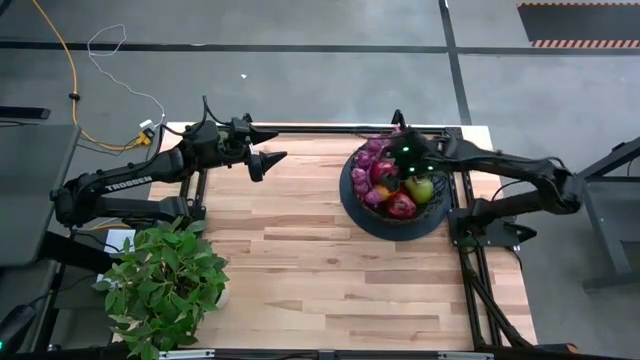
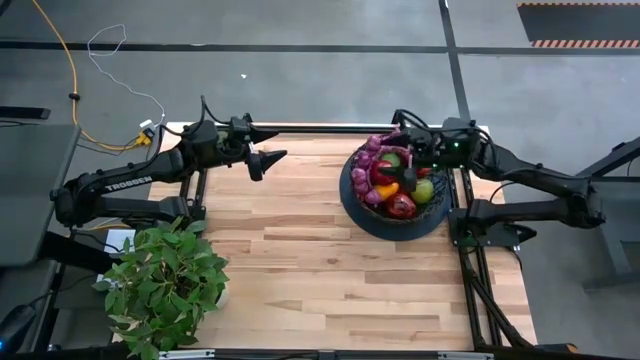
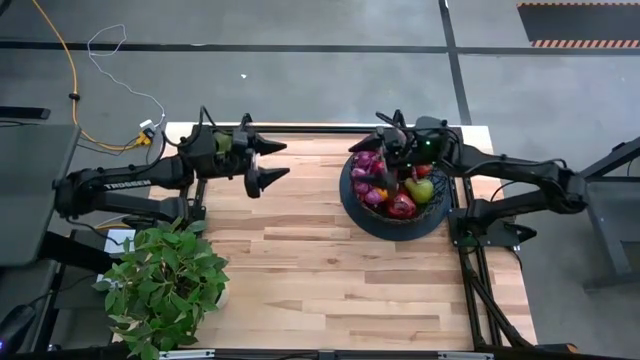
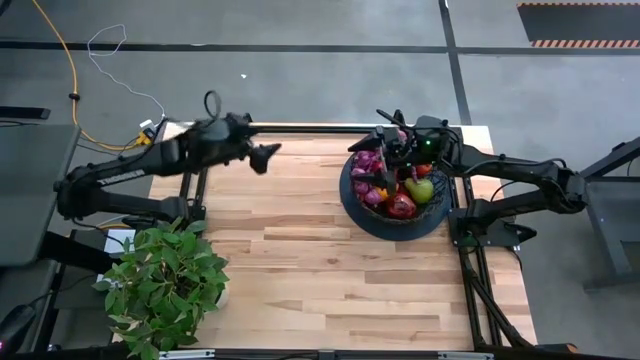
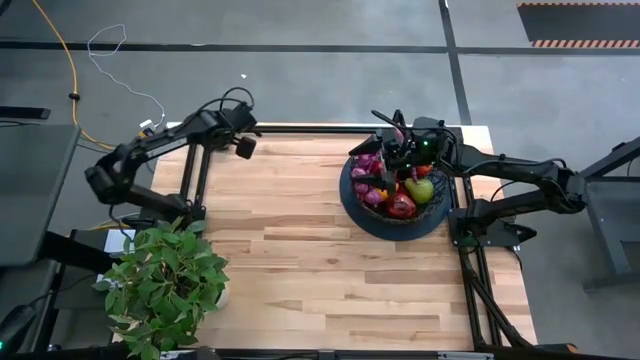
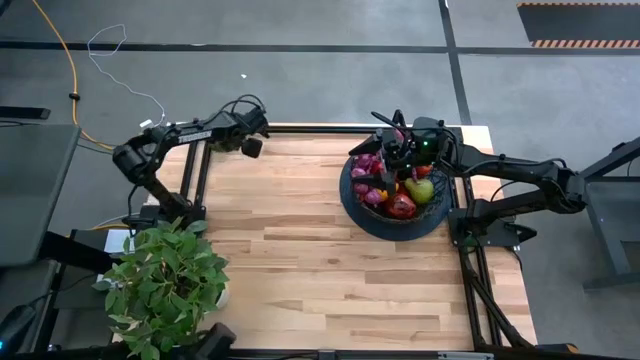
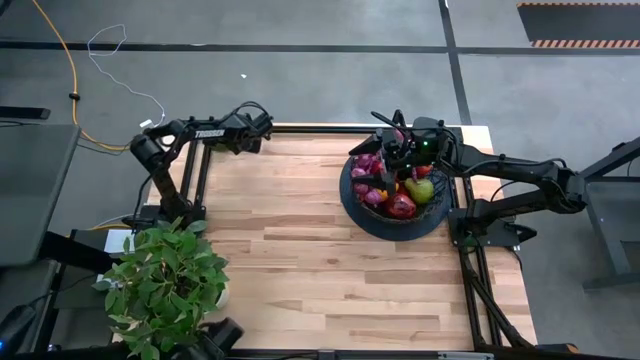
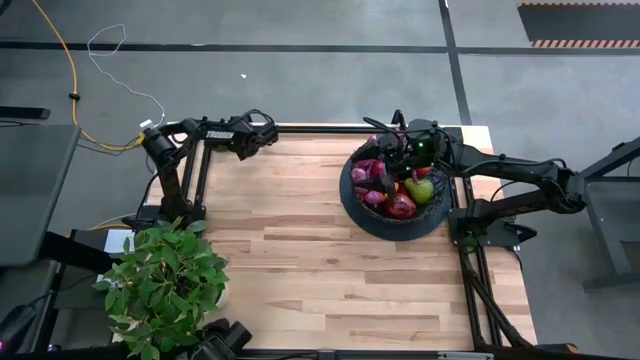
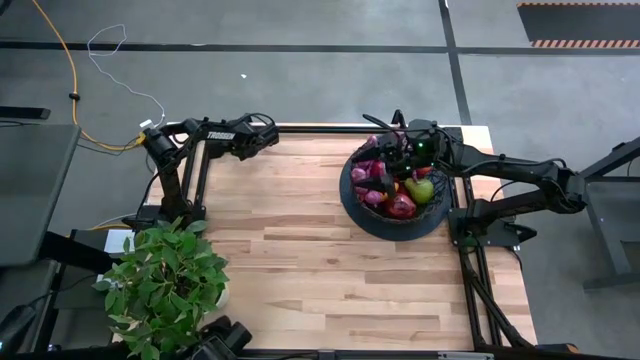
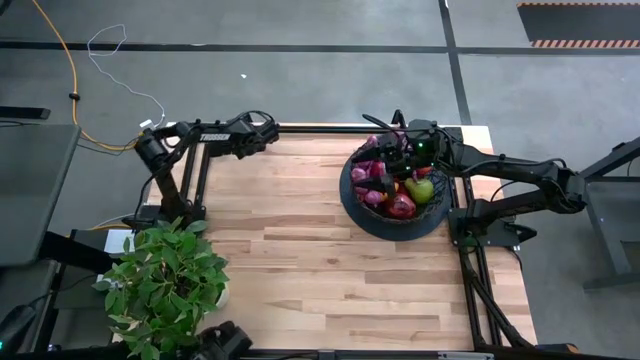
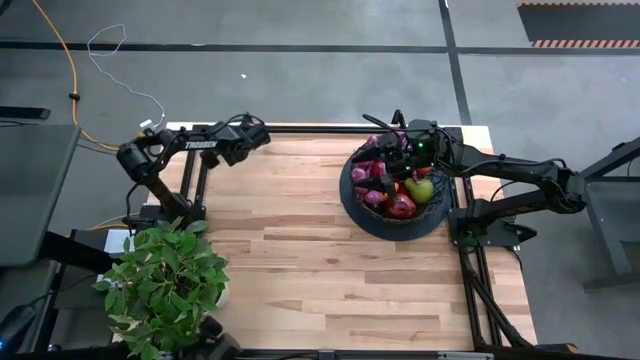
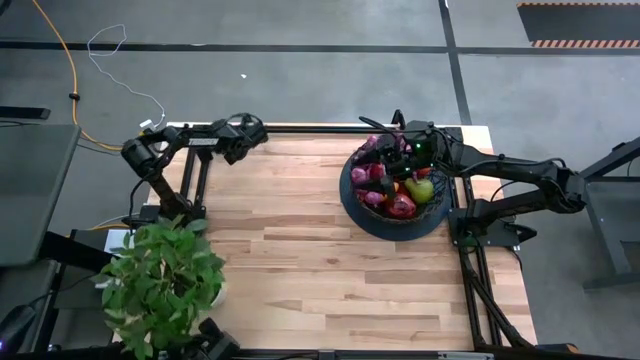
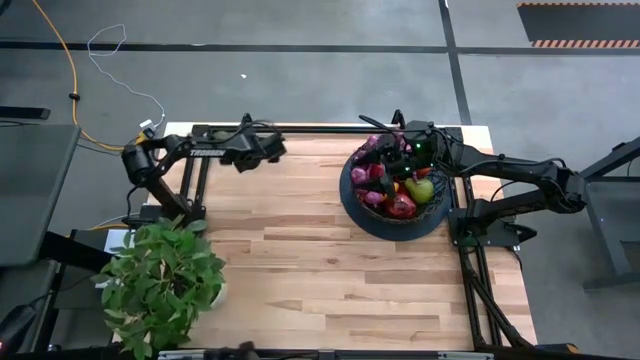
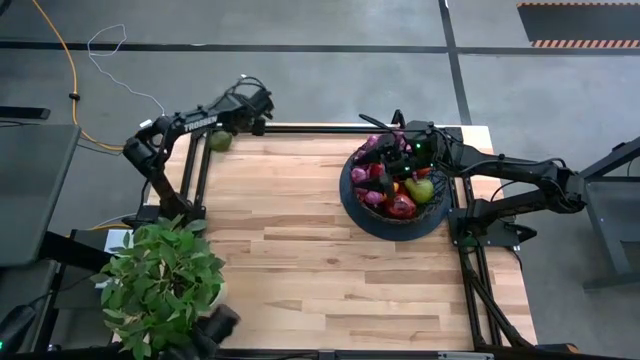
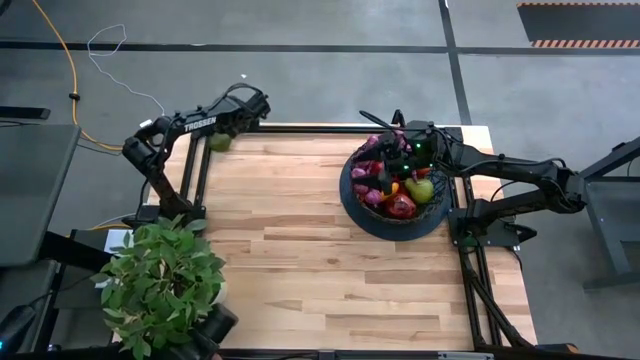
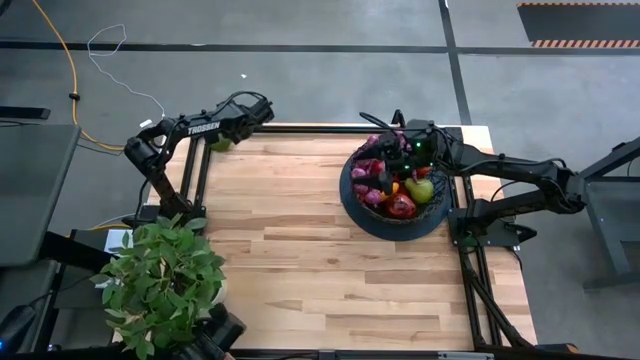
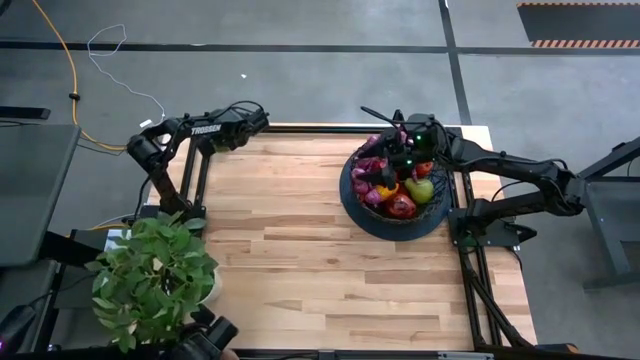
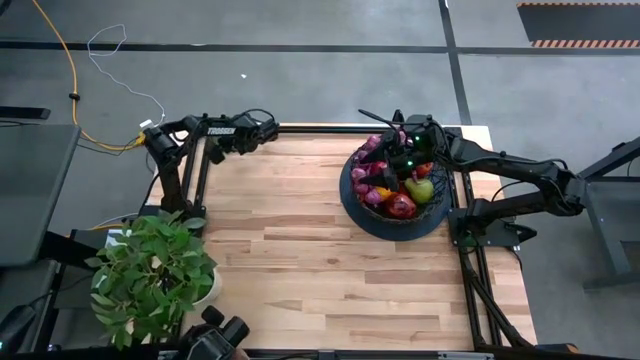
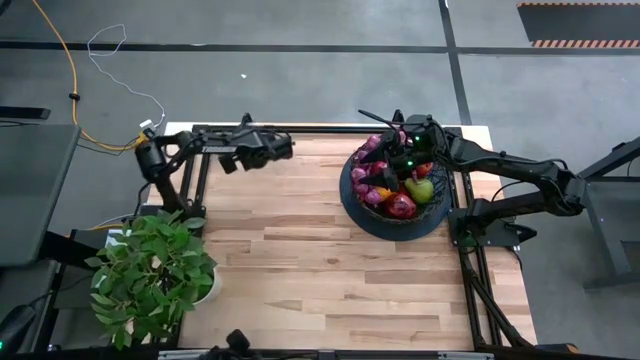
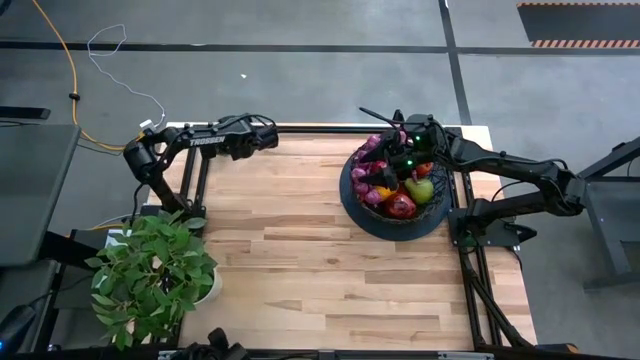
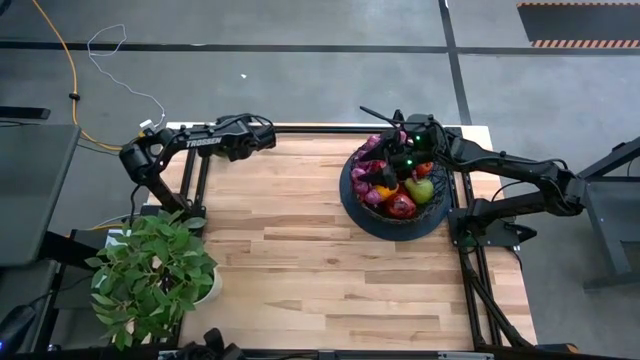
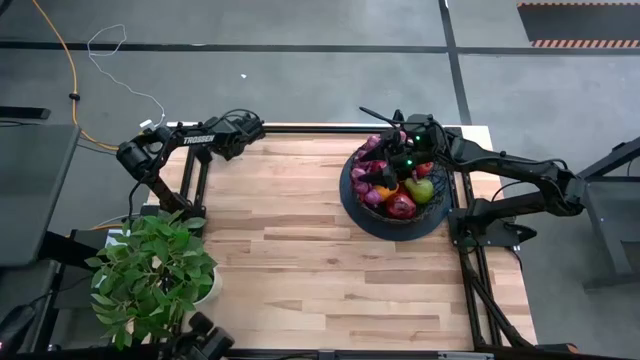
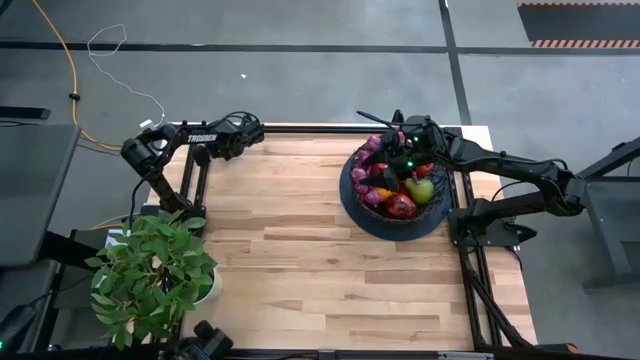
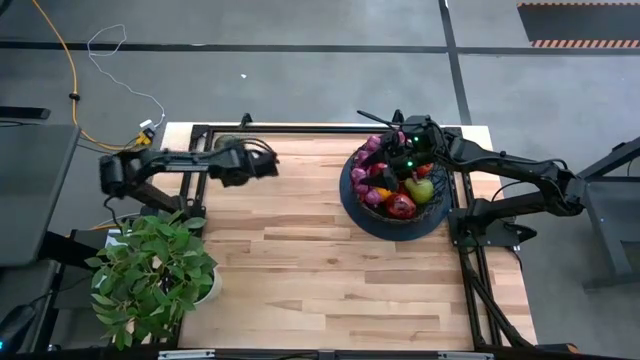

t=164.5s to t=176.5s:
Task: Build produce basket
Put the green lime into the black wire basket

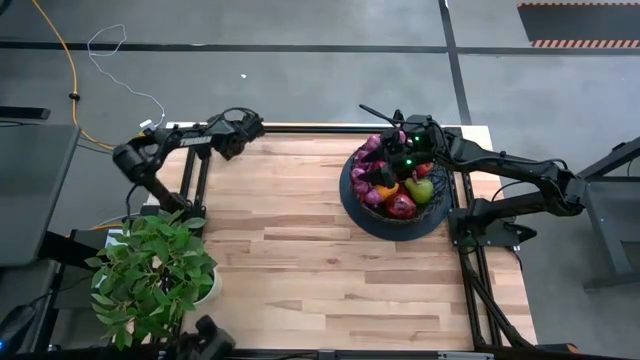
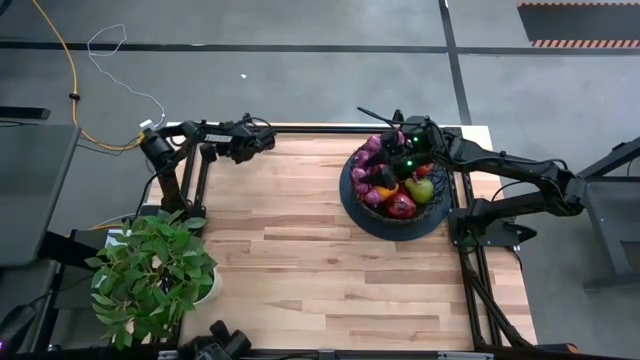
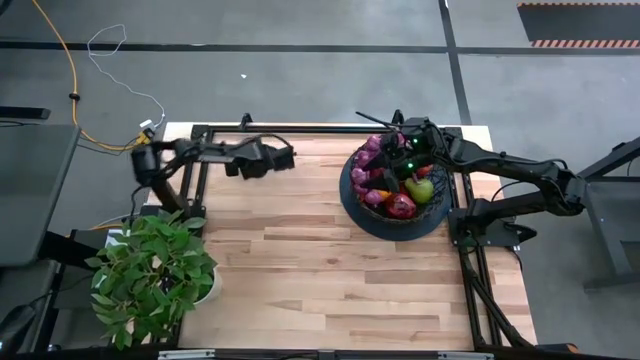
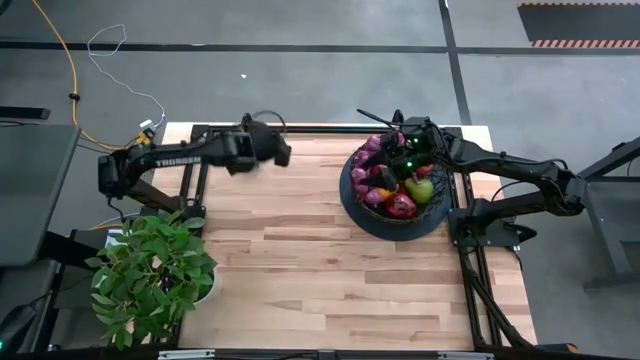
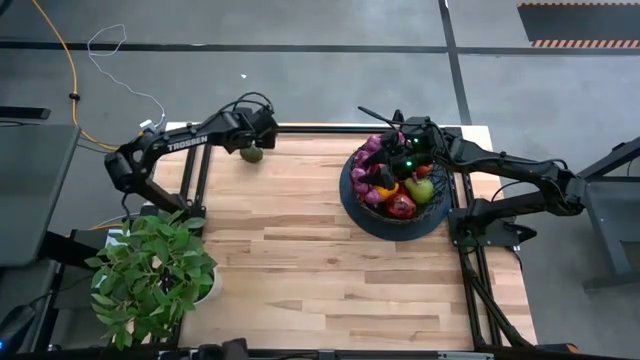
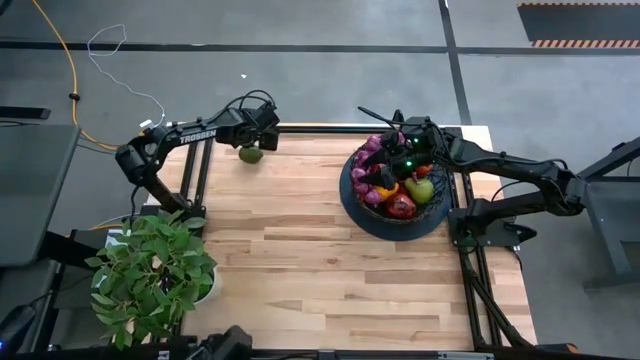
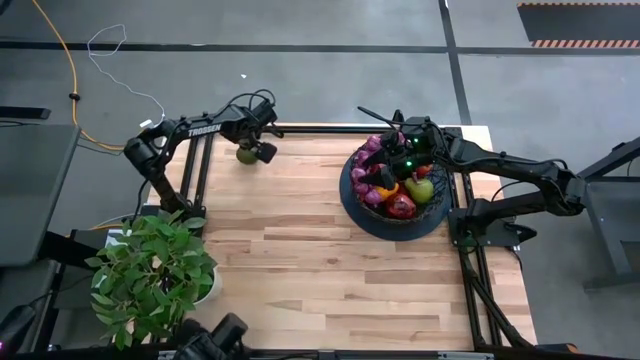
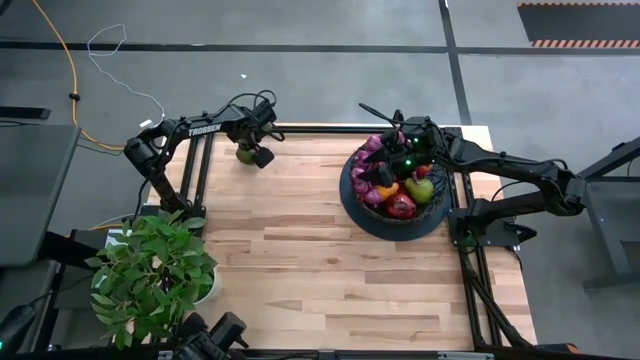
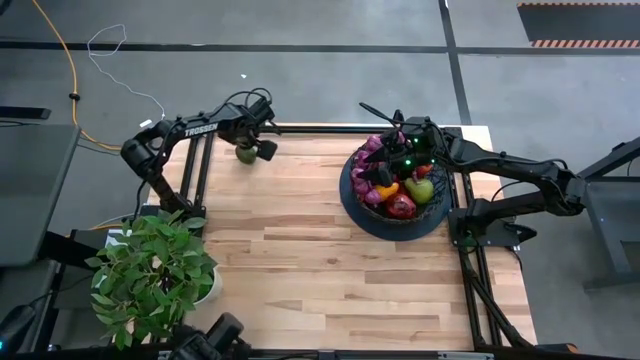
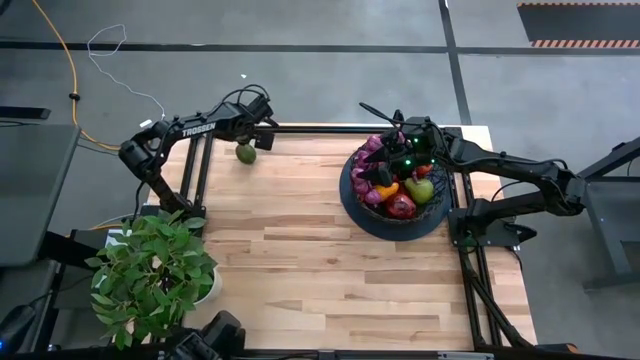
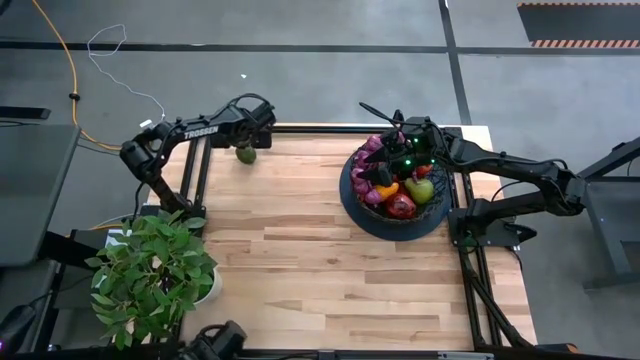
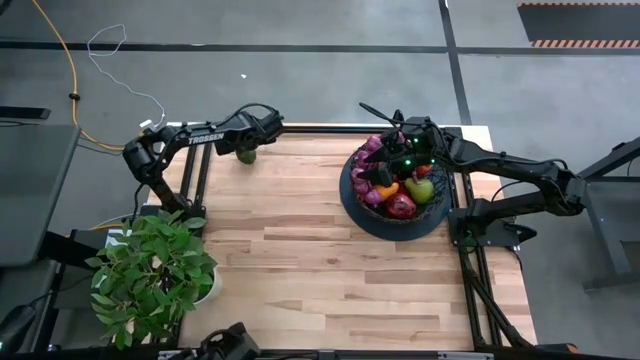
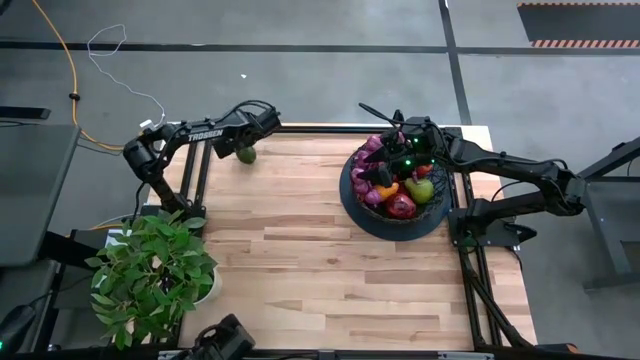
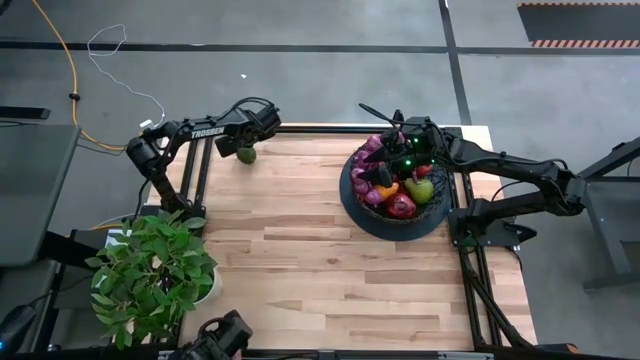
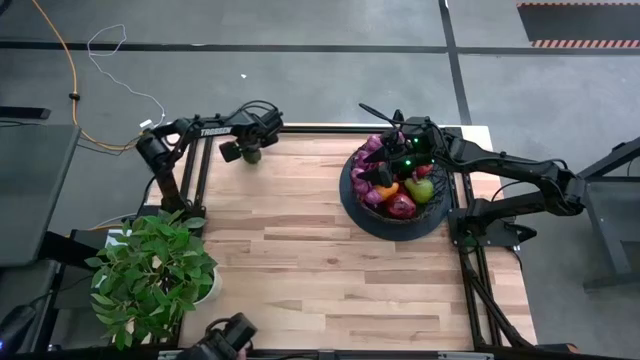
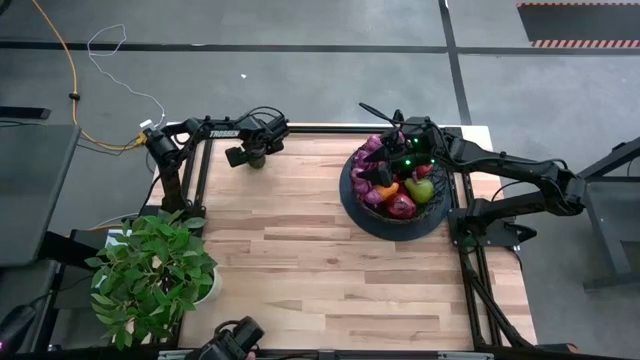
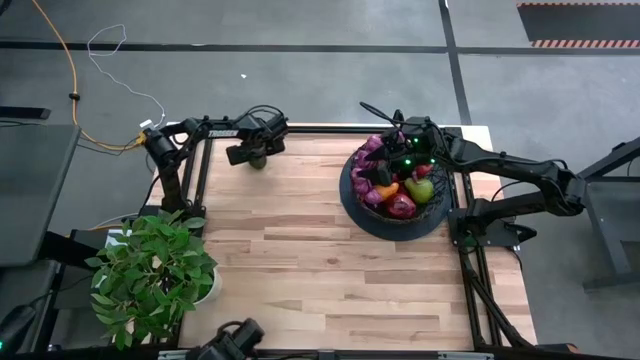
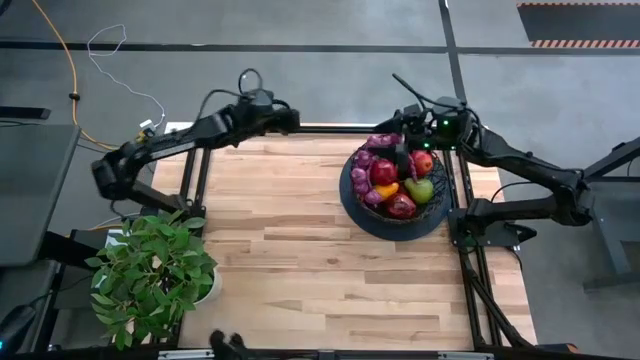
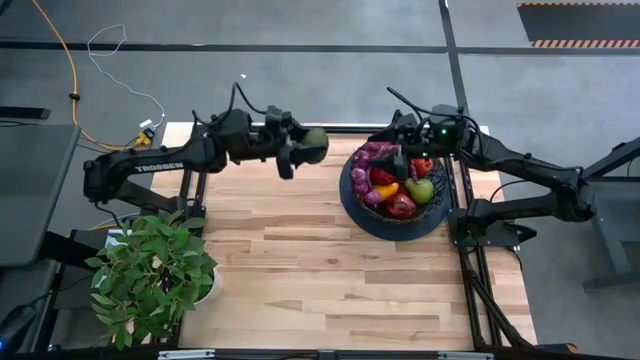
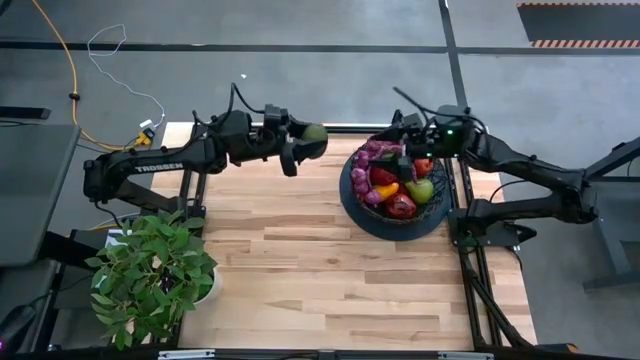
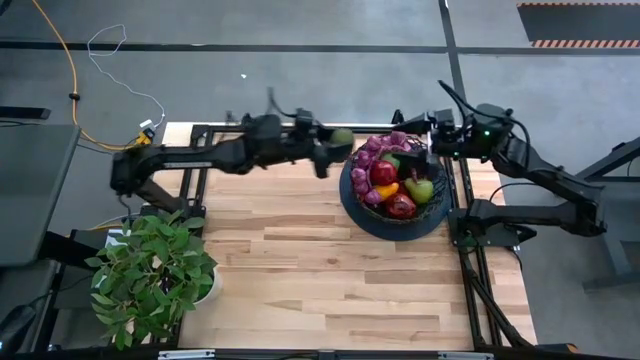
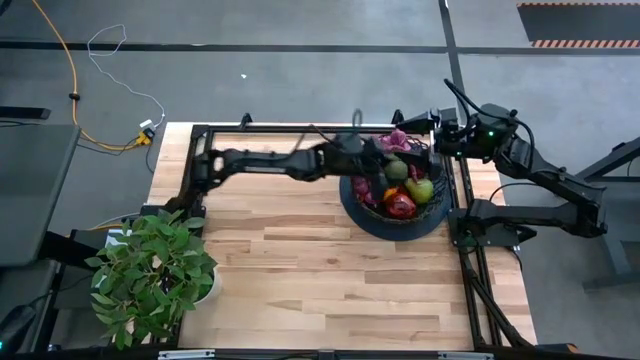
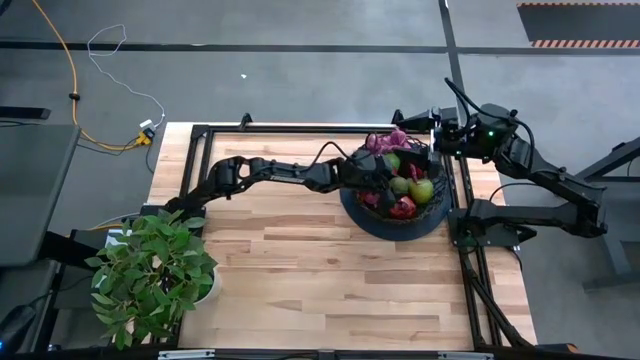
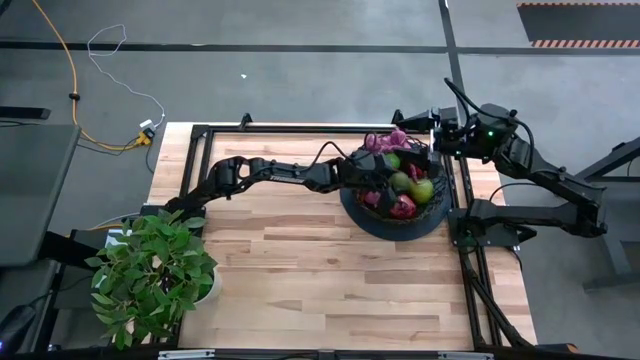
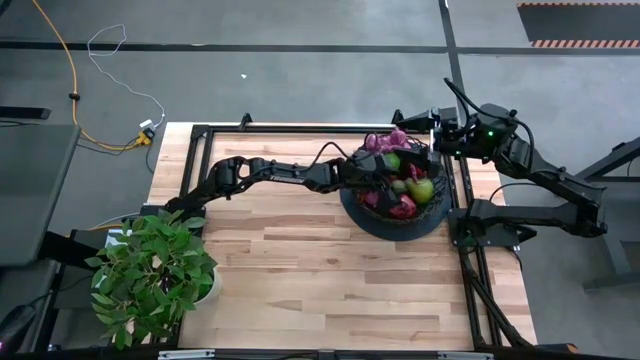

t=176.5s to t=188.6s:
Put the green lime into the black wire basket
